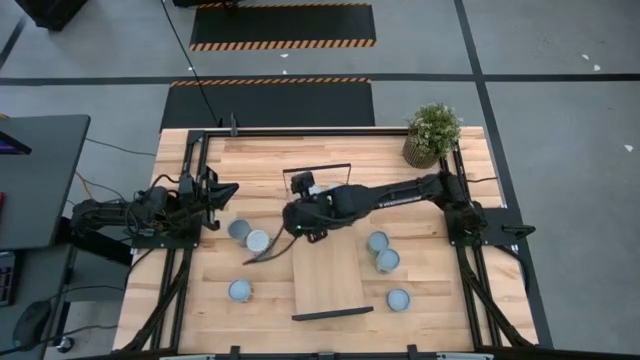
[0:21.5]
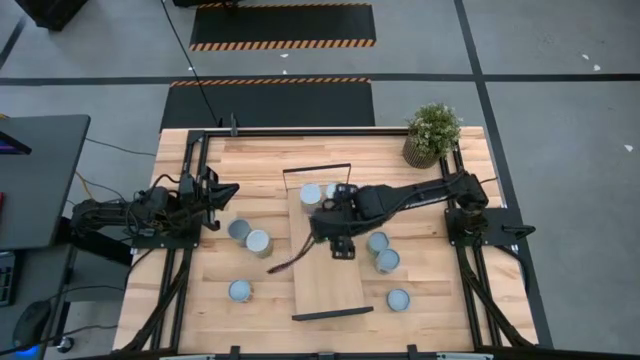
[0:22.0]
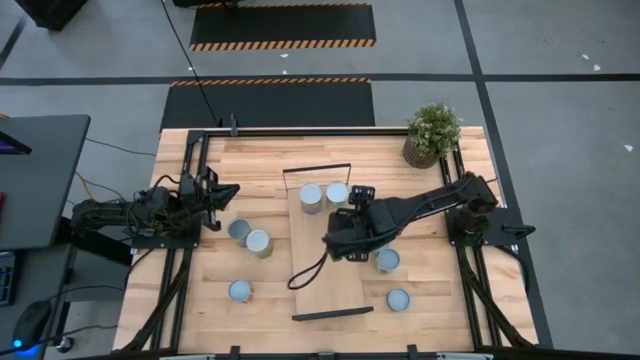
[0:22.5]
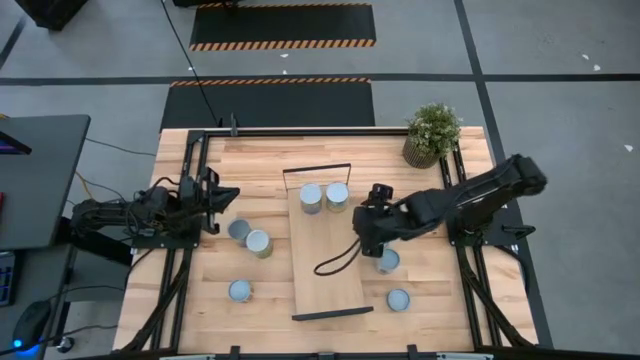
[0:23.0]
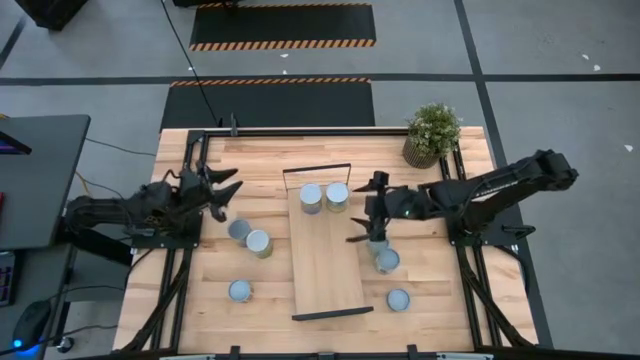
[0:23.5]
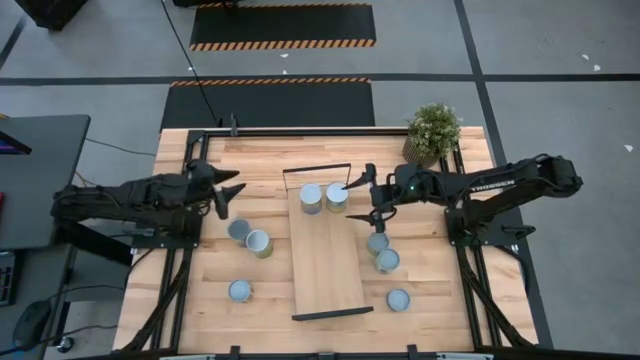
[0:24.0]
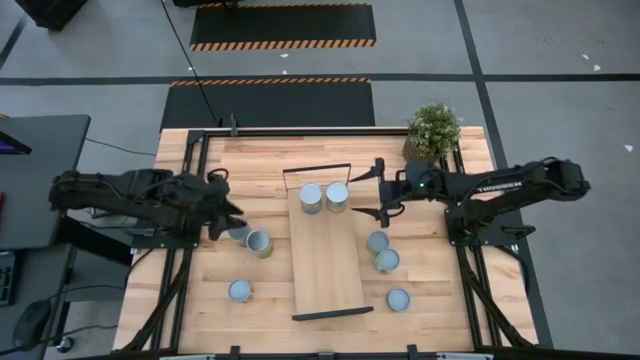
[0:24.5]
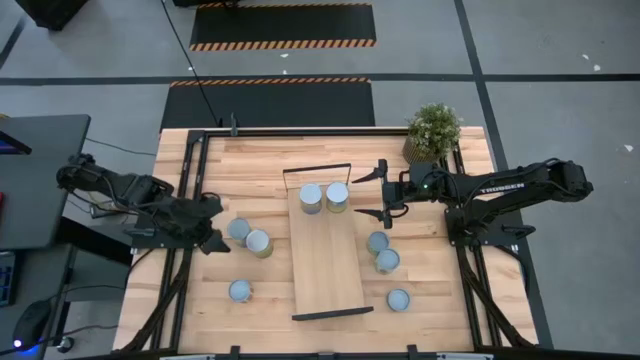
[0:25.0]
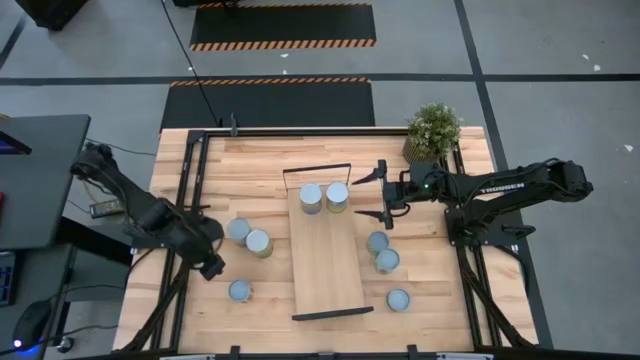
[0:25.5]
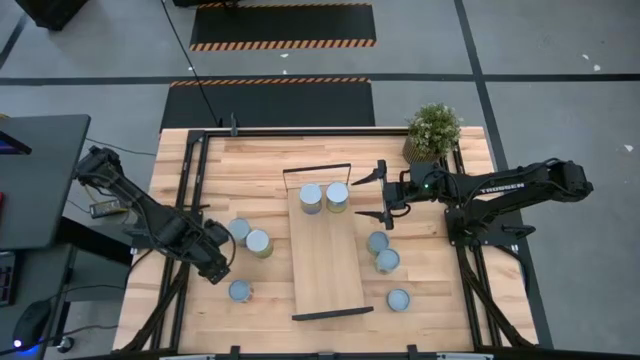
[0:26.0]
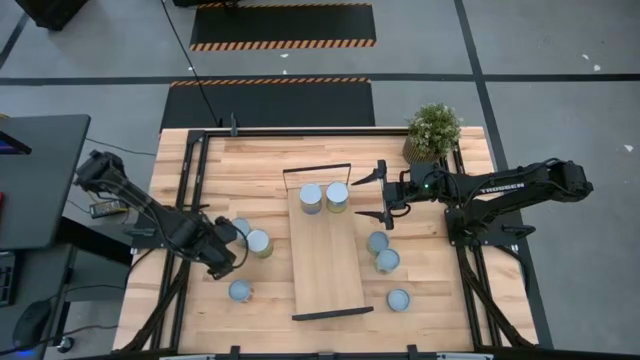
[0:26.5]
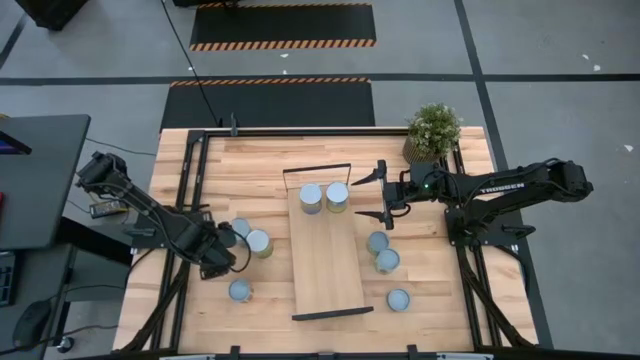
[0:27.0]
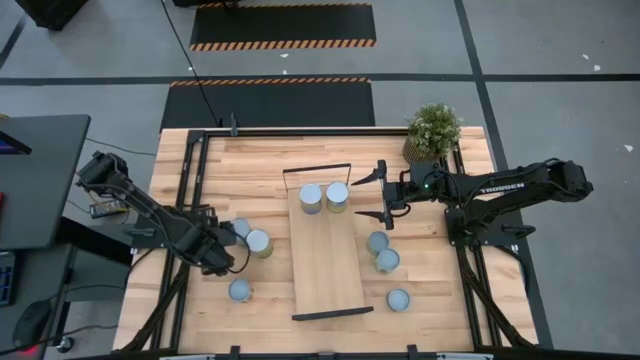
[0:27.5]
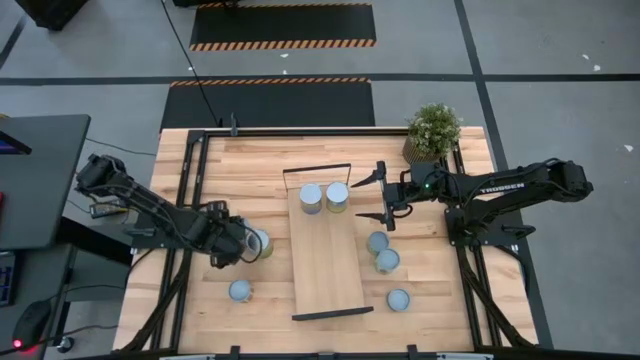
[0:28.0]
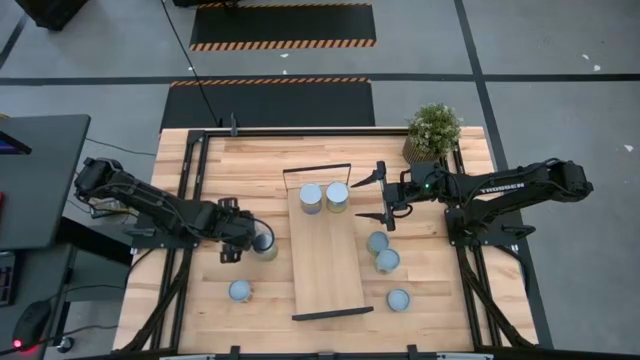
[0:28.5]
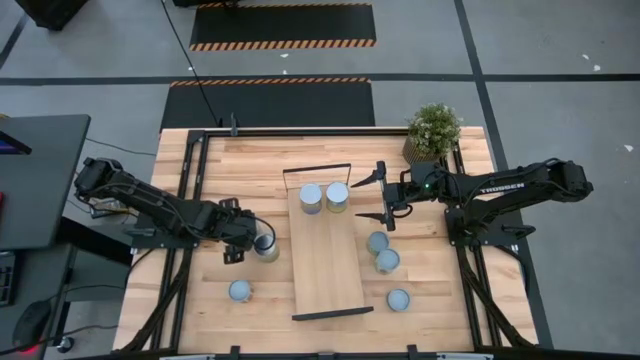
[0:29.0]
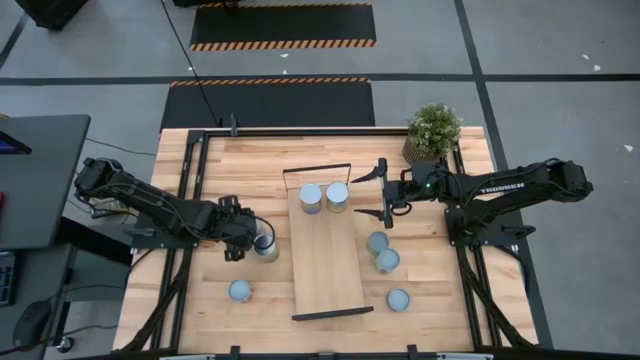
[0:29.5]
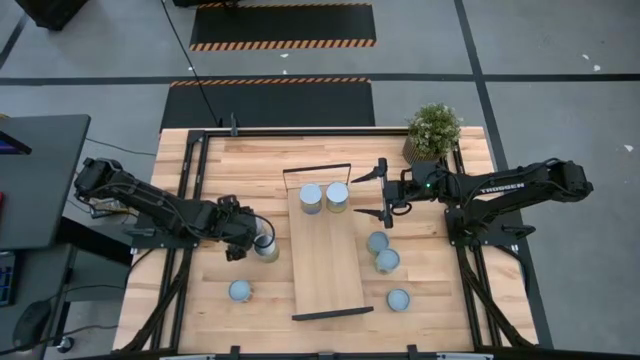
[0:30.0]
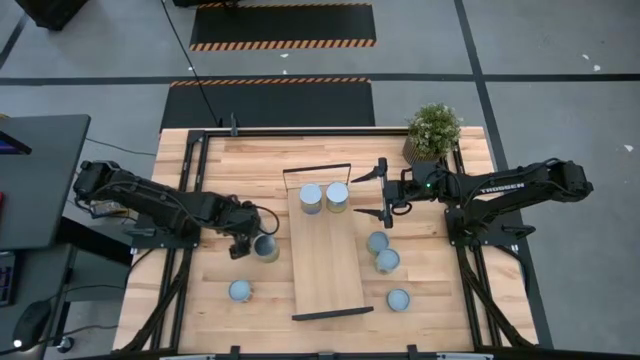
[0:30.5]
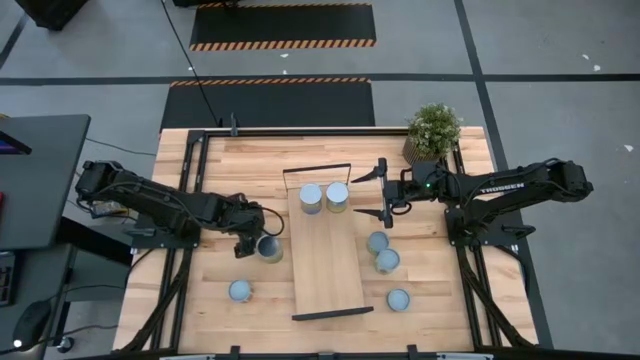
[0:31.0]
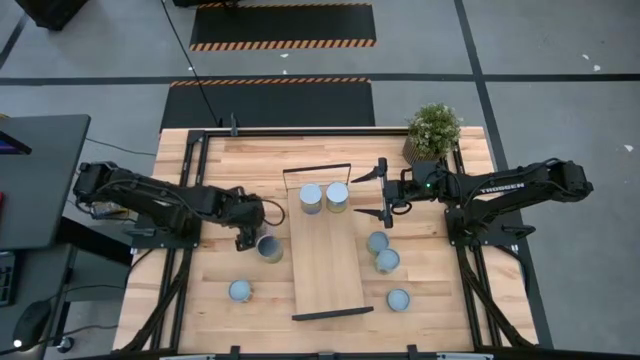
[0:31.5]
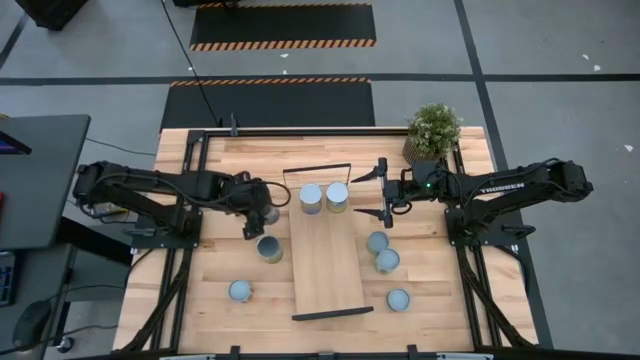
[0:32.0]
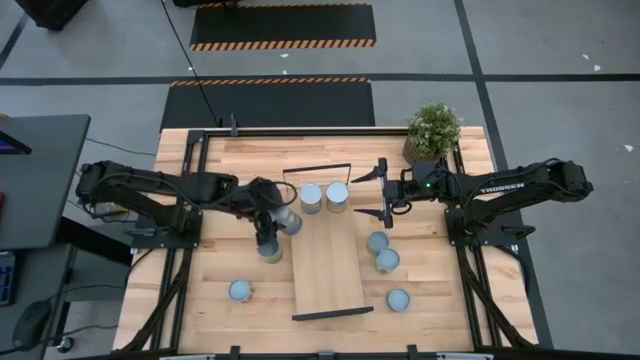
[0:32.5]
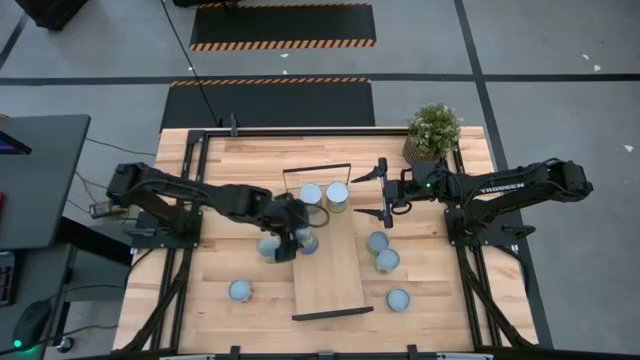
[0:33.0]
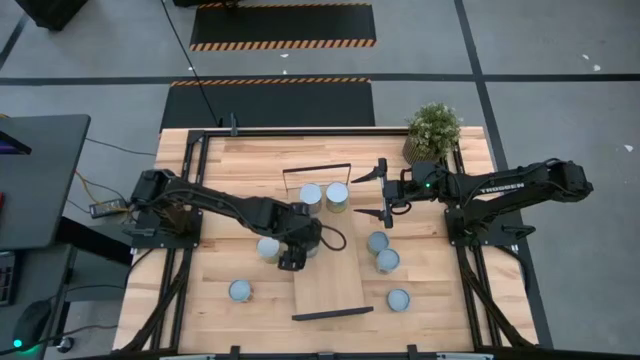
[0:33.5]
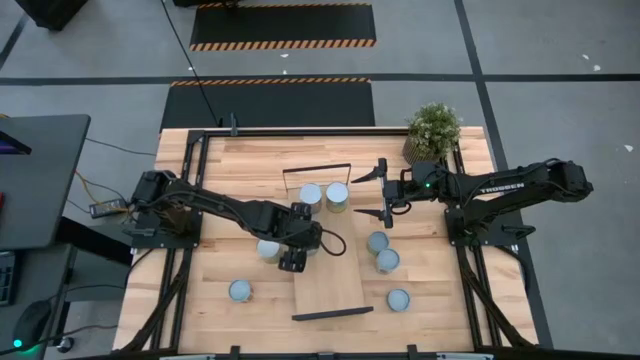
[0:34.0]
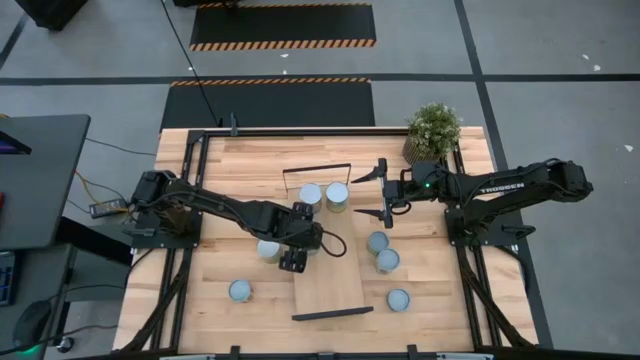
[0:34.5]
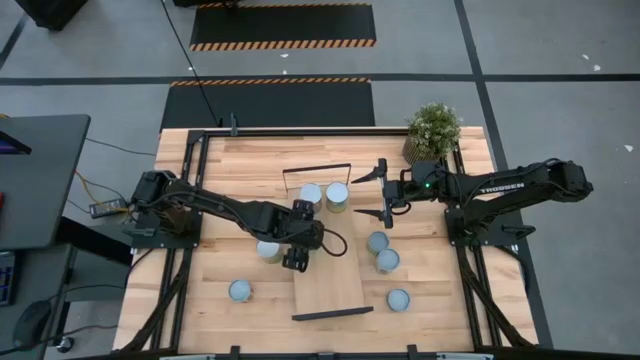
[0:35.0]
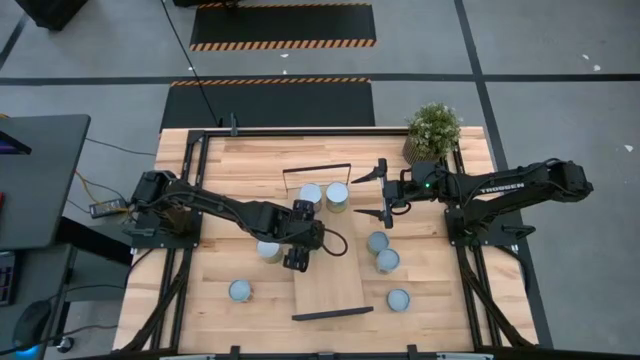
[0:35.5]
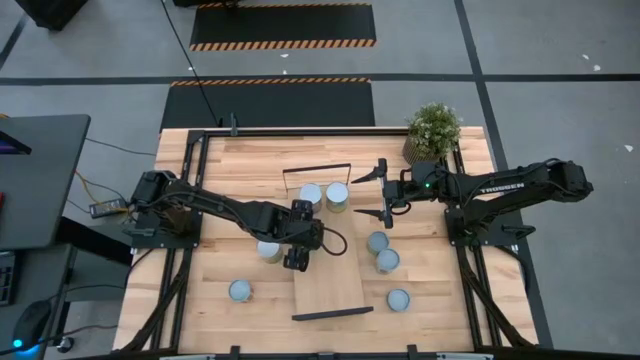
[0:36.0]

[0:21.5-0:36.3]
Task: Pick and place cans onto a shelf
Put the canned peas on the shelf

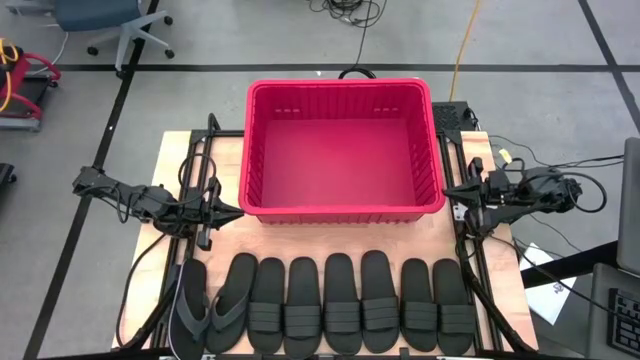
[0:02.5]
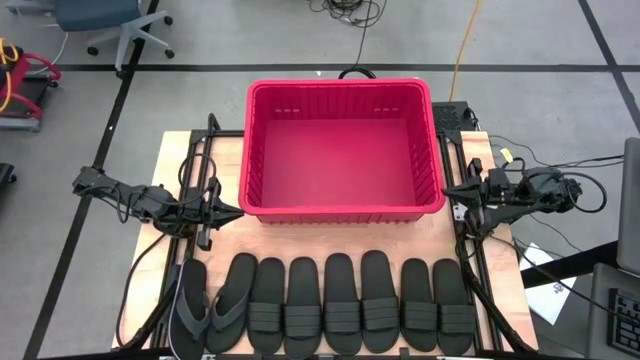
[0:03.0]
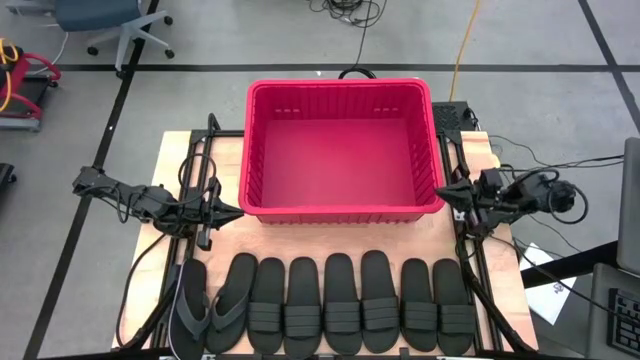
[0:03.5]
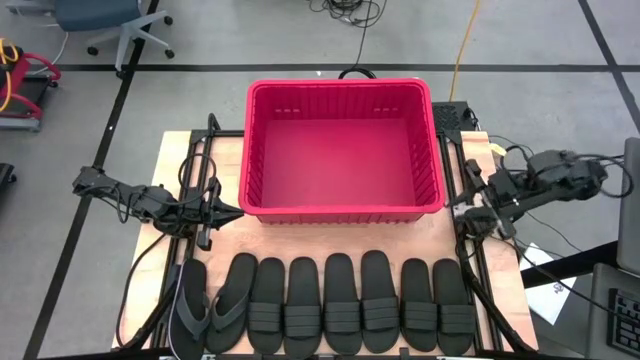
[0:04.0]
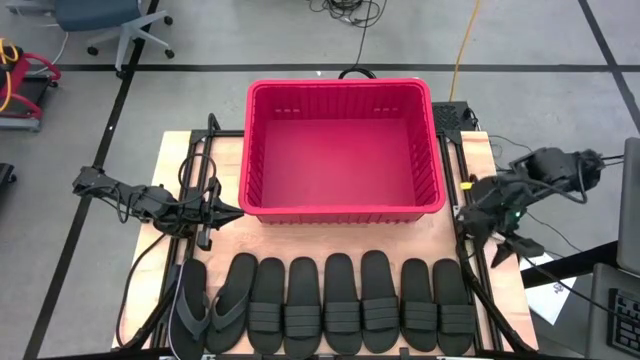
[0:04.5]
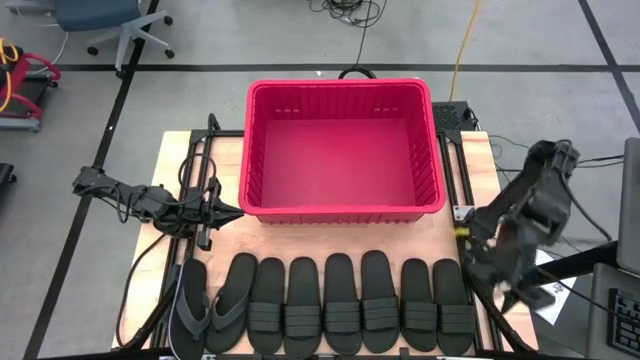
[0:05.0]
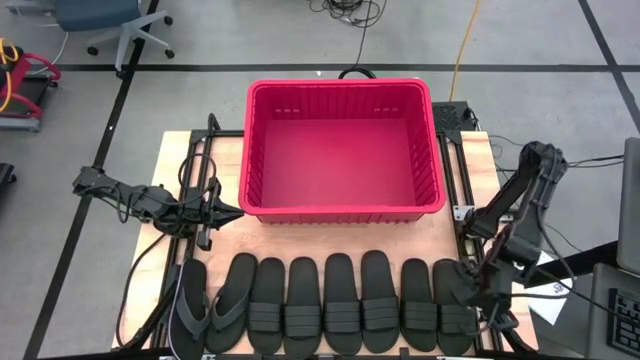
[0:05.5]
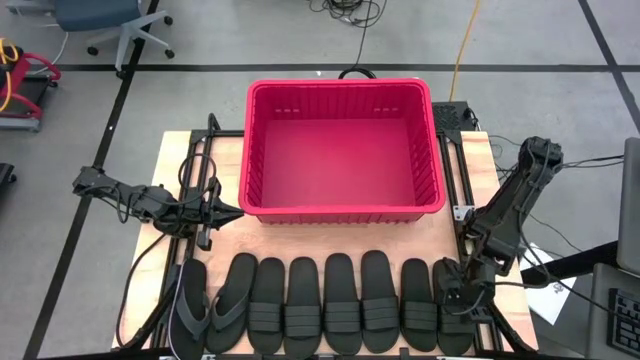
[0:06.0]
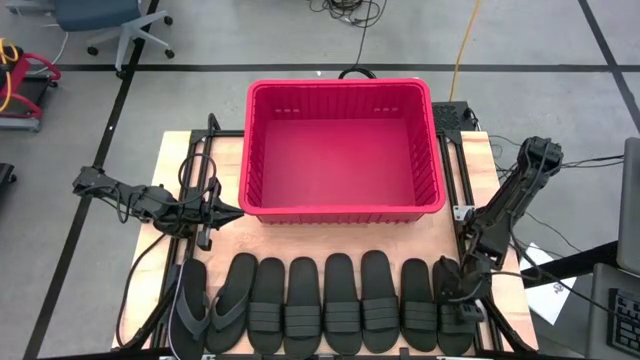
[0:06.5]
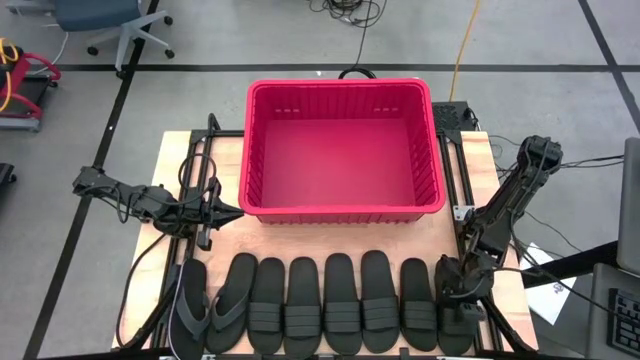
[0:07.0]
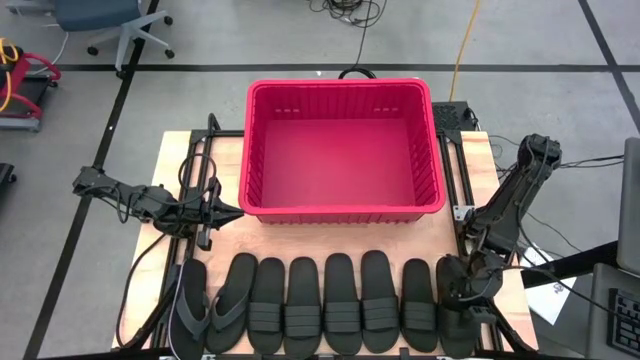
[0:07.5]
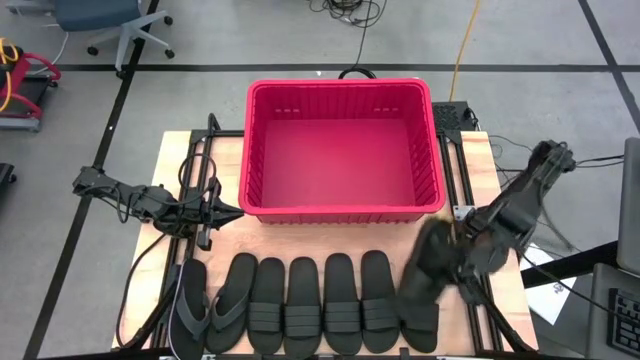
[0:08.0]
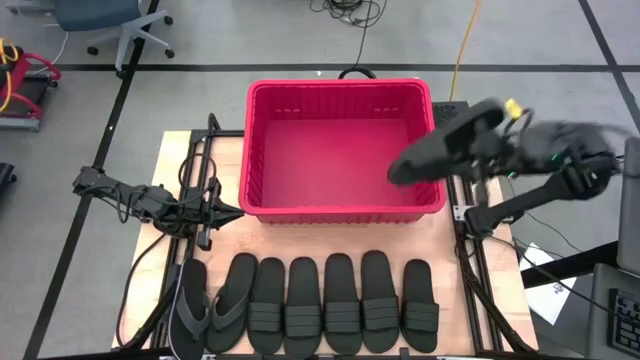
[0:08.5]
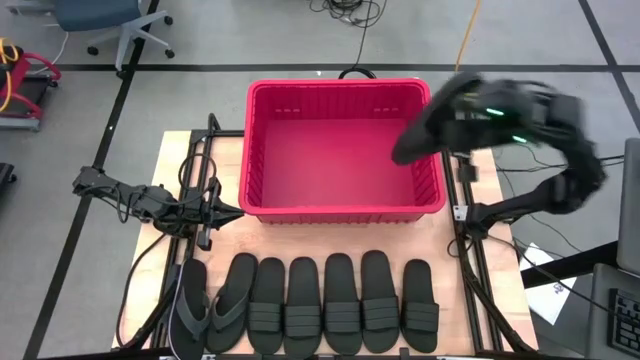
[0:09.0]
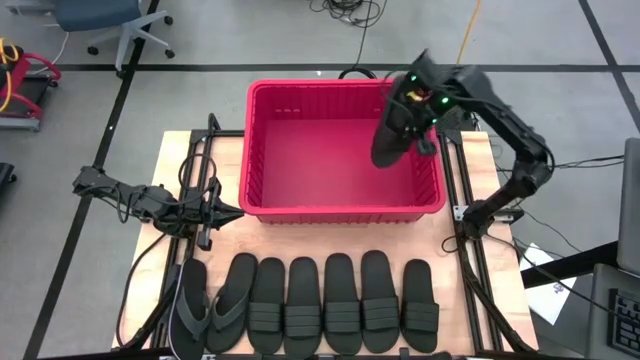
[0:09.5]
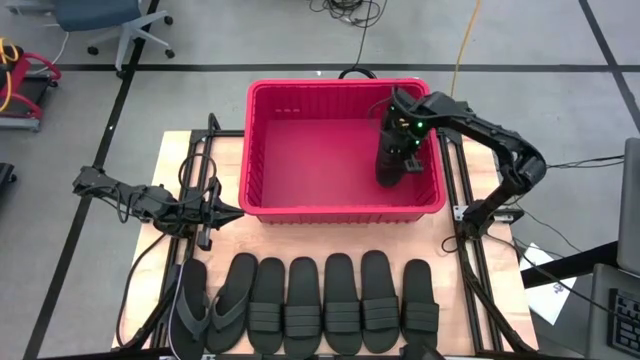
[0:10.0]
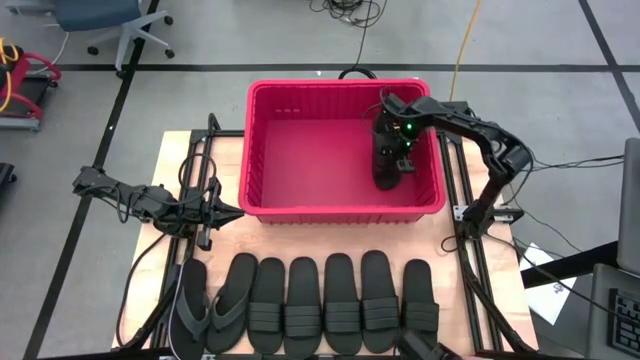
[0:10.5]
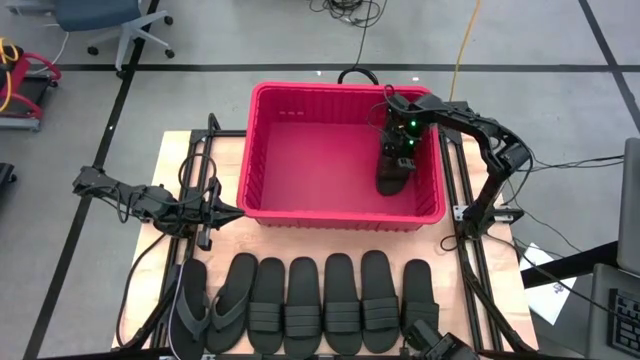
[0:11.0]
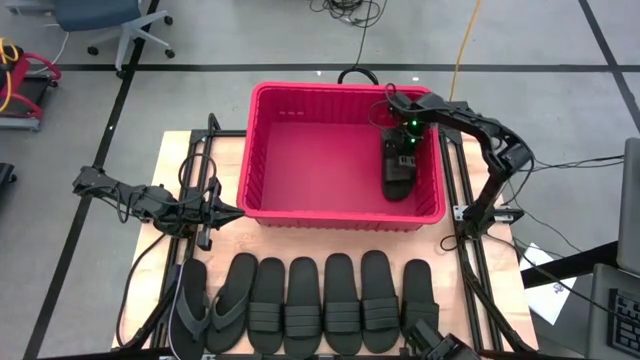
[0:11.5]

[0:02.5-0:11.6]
Task: Pick and place slides into bin
Put the black slide into the red bin
